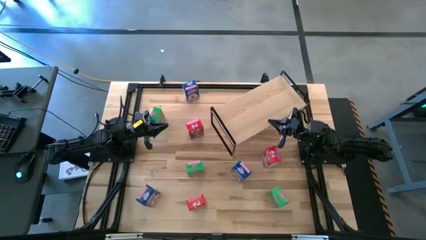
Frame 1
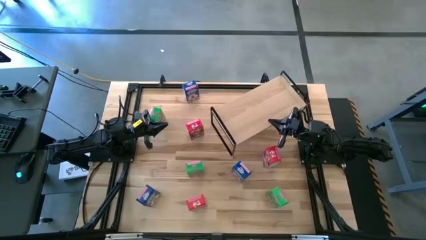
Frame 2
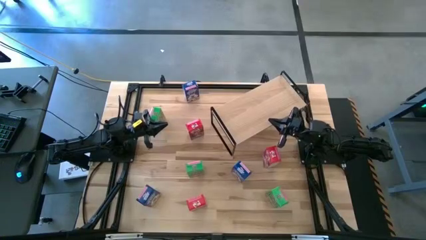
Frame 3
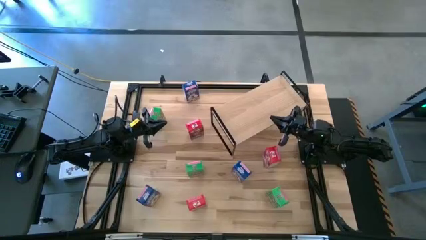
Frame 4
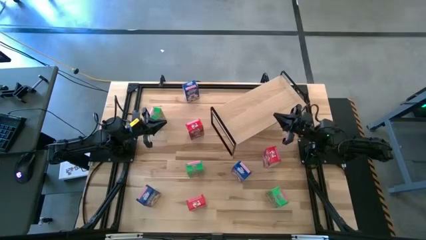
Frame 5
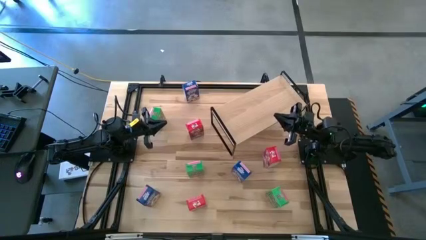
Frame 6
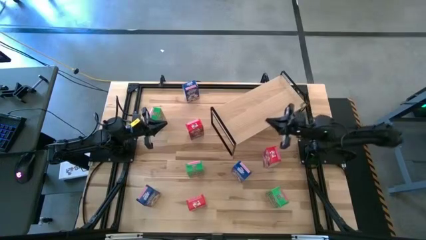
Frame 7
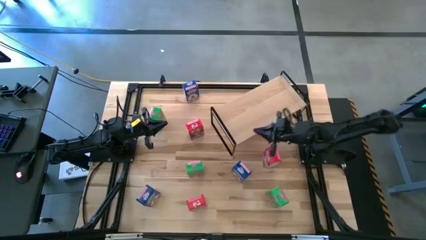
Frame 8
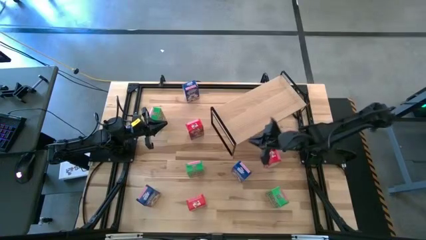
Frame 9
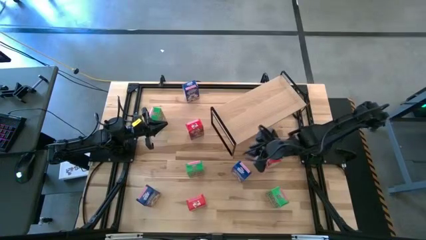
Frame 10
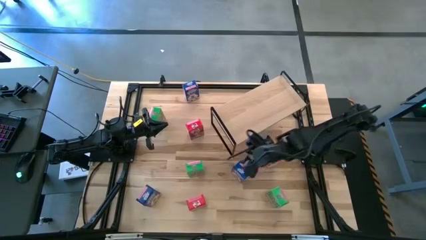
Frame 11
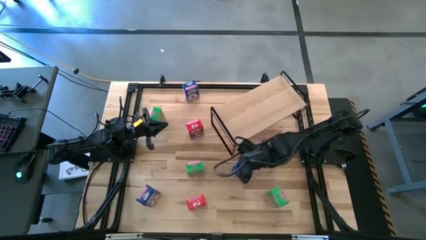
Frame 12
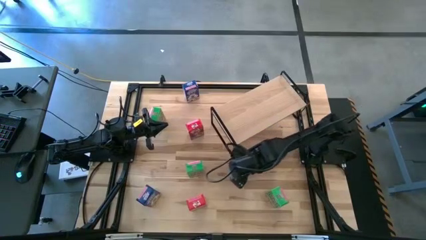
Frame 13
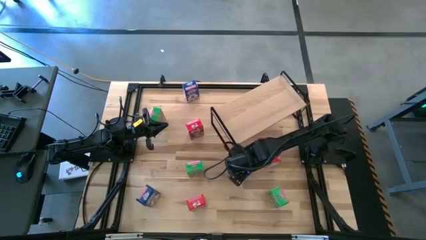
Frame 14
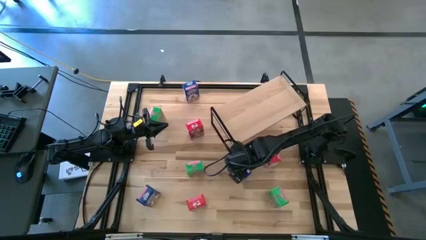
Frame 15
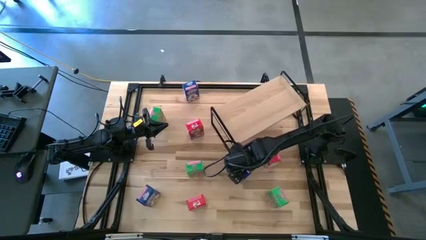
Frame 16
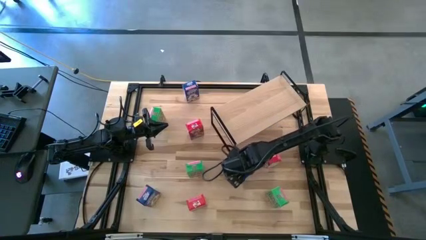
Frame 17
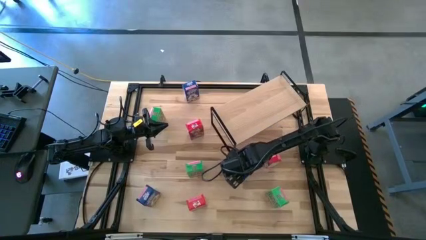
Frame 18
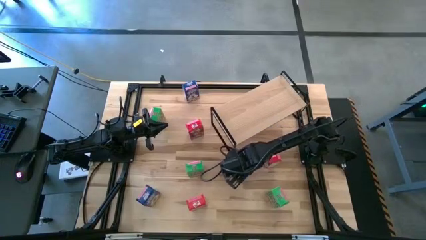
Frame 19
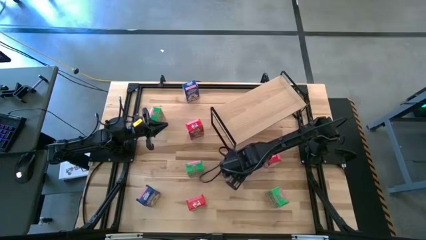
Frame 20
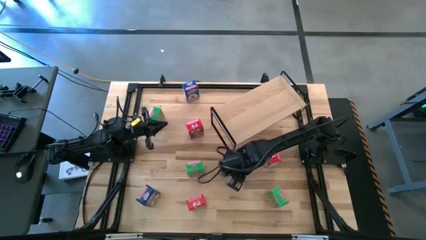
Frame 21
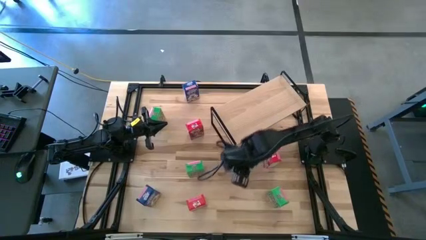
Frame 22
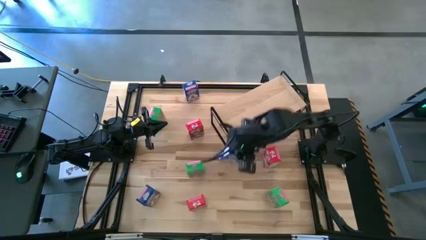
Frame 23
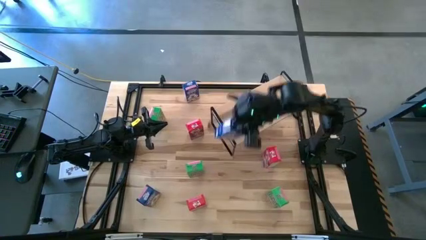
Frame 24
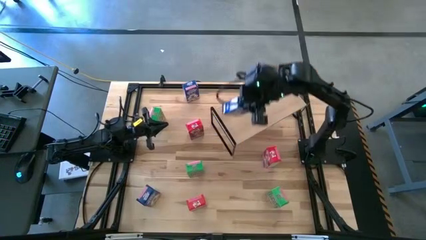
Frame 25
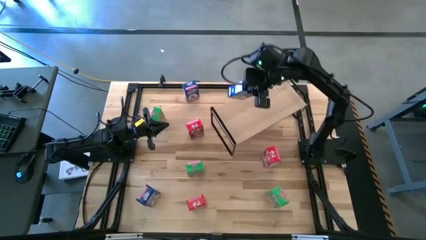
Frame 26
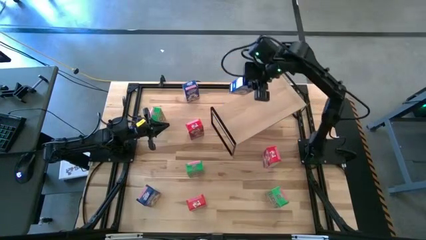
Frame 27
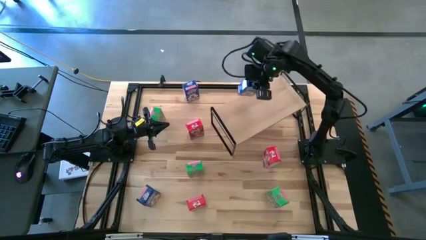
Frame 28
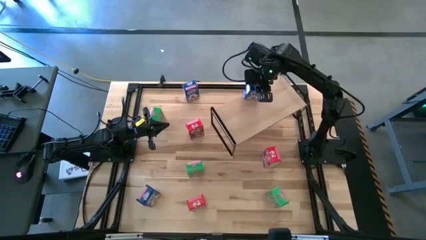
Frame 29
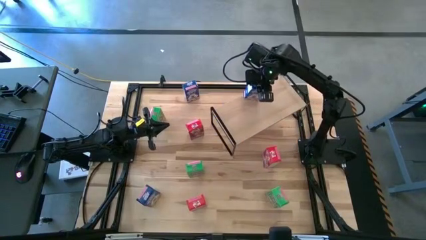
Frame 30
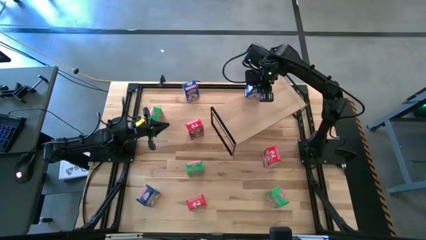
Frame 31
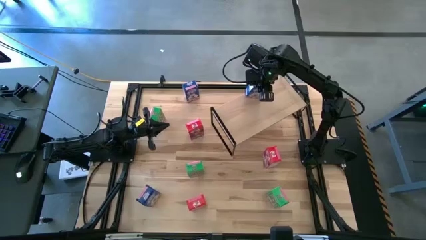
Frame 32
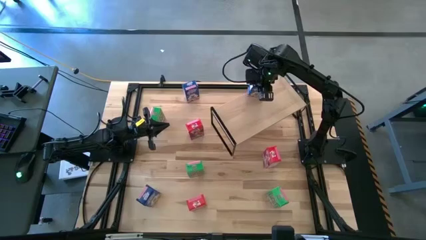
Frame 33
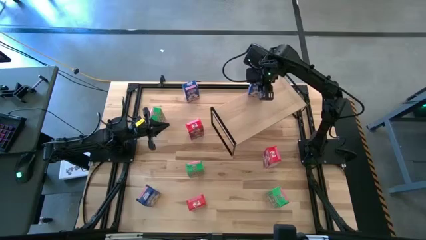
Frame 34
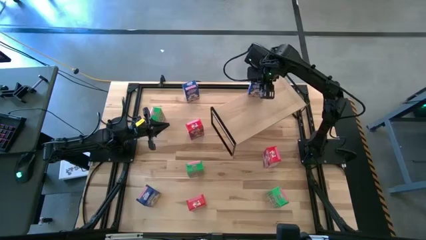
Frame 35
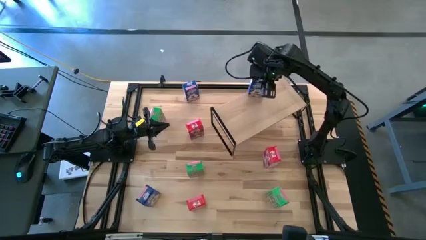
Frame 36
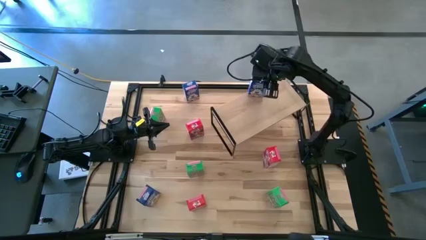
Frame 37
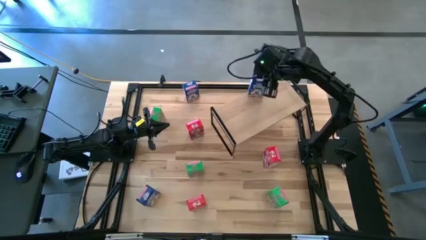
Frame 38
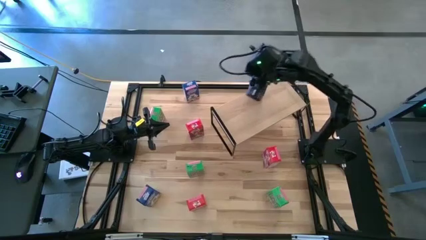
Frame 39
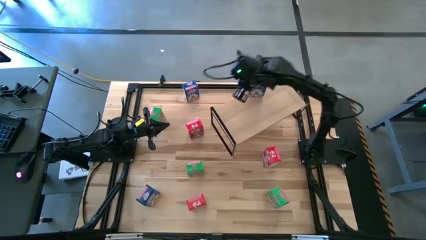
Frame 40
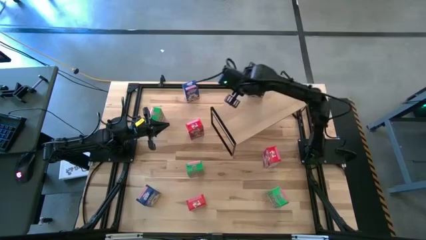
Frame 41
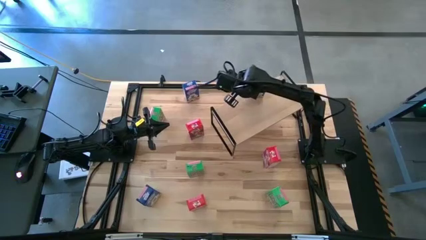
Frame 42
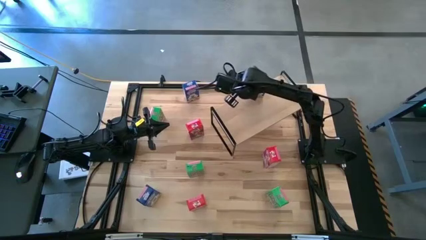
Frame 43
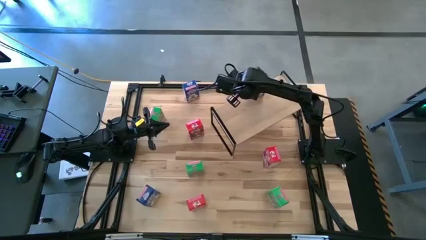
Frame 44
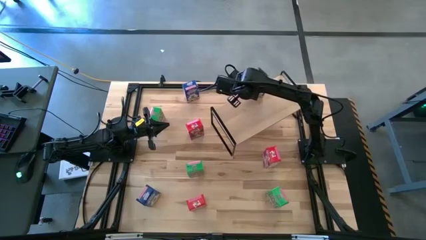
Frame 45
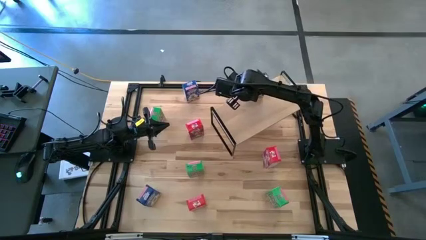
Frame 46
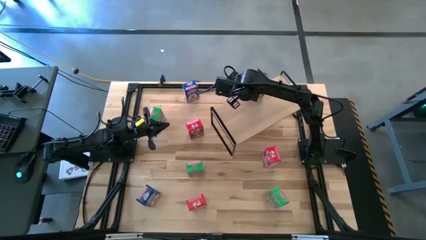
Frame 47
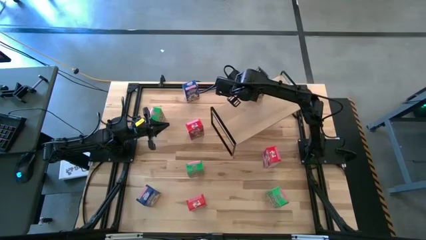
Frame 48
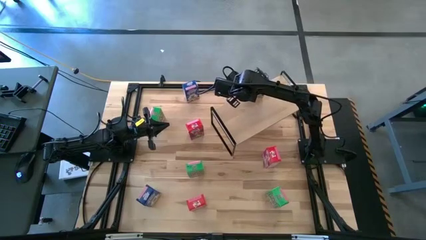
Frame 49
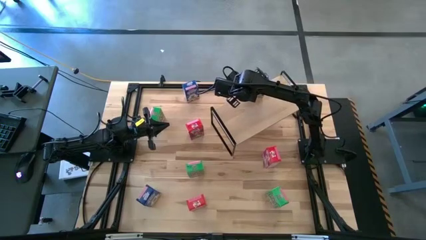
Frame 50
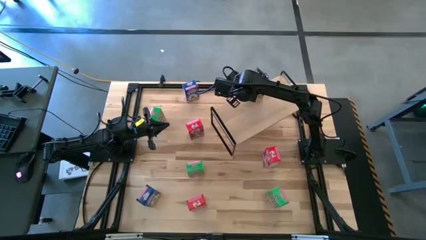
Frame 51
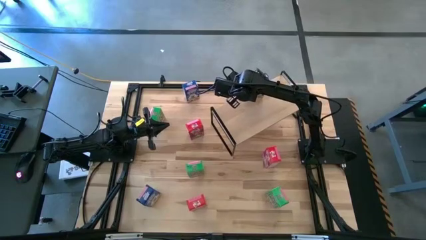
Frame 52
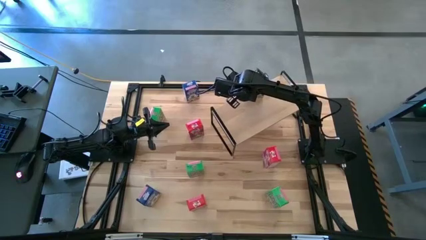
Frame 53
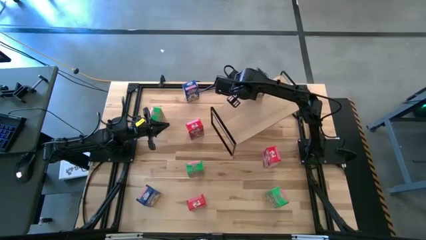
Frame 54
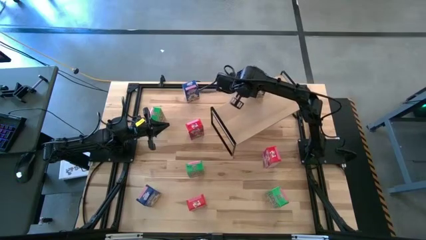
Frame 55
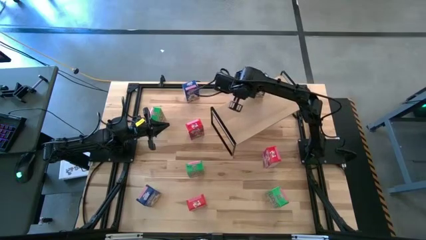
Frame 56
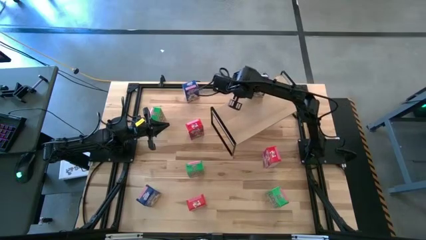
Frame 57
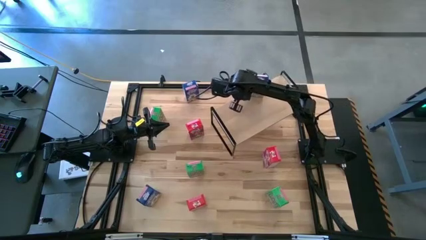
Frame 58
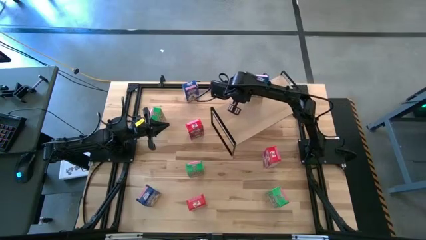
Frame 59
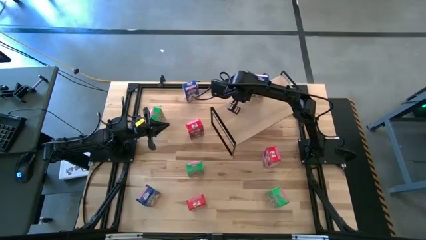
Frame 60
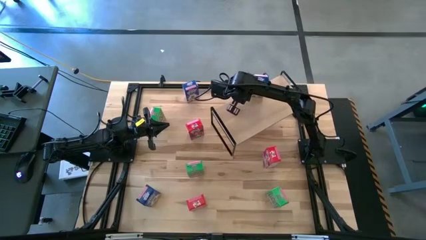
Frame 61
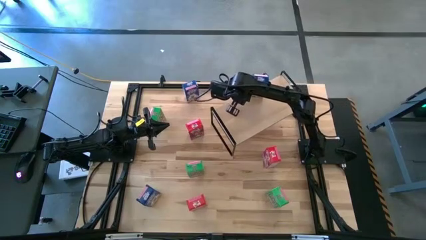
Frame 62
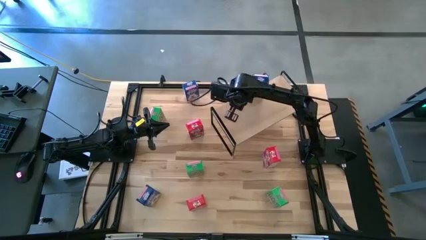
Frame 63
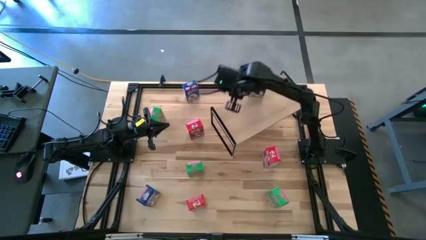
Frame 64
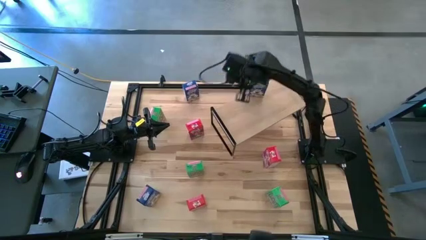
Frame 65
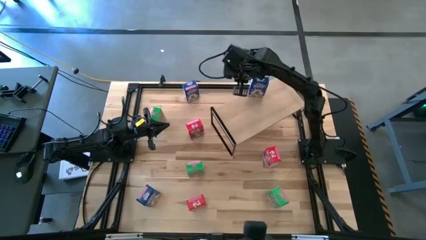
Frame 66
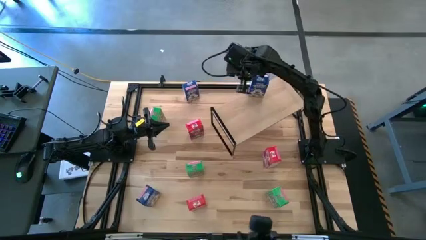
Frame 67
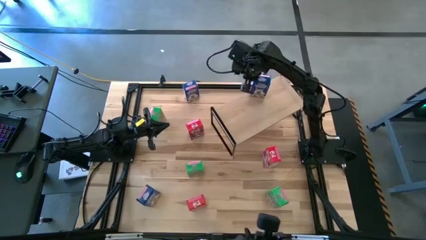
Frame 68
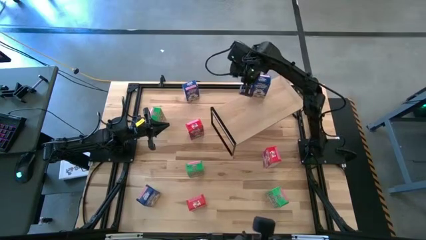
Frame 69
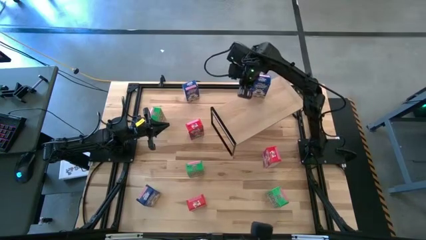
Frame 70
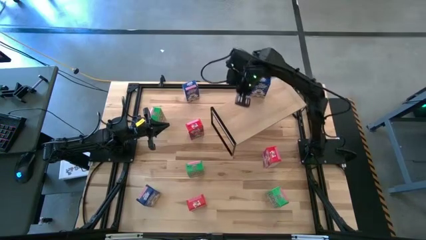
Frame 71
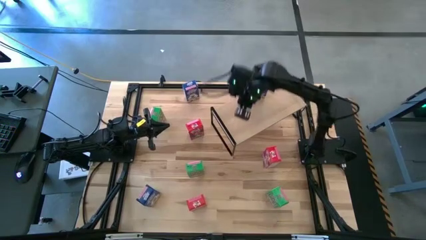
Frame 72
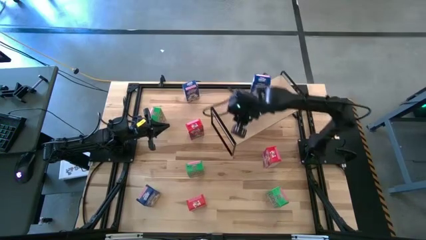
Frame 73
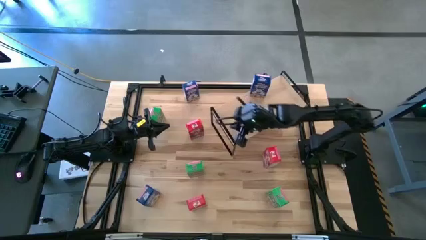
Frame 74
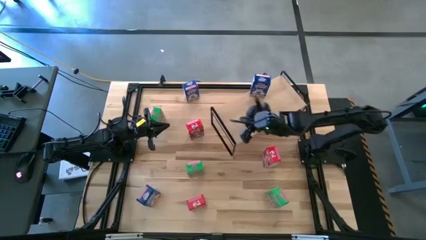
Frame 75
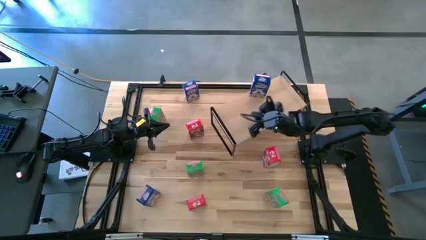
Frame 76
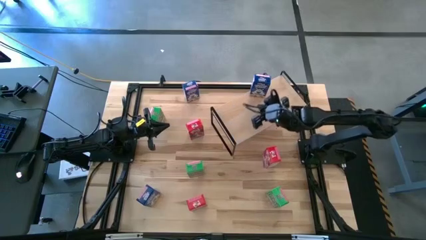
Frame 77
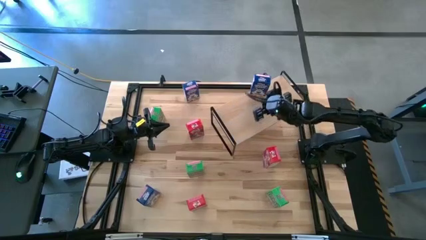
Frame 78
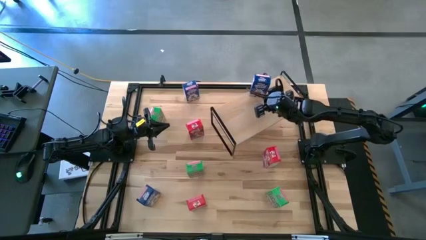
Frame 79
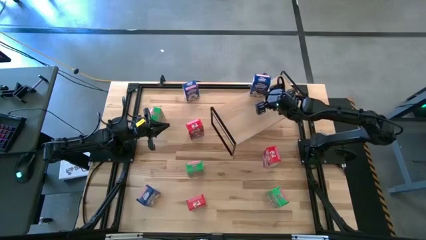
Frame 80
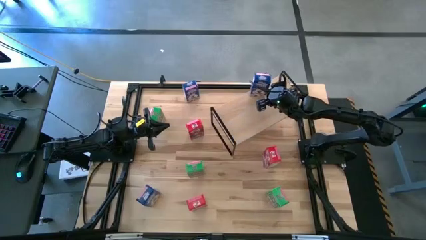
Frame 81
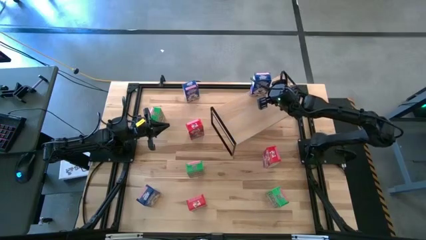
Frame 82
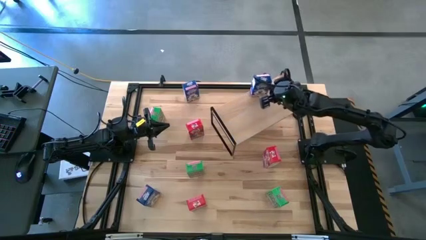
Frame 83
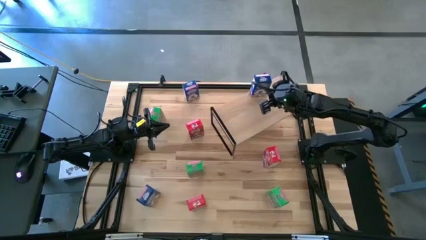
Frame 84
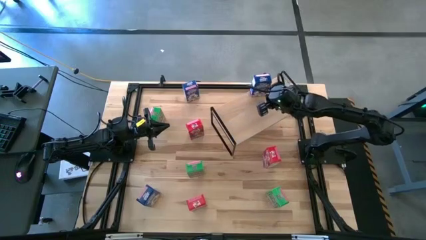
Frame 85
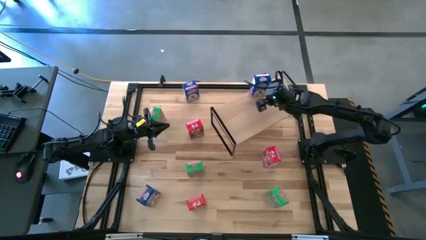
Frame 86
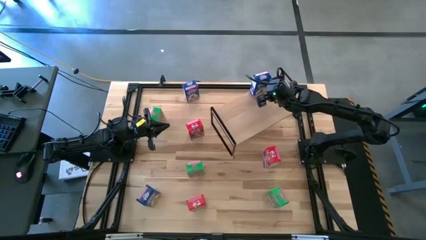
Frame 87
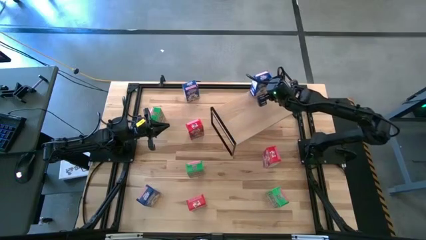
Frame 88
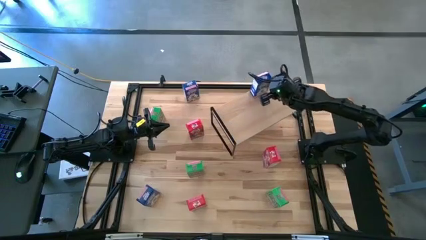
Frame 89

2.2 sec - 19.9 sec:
Task: Stack cereal on shelf
Put the bottom right blue cereal box on the shelf
